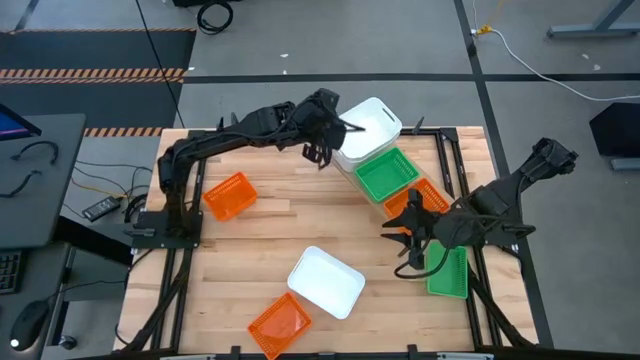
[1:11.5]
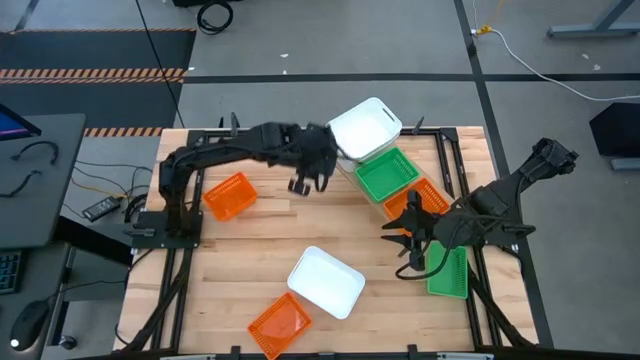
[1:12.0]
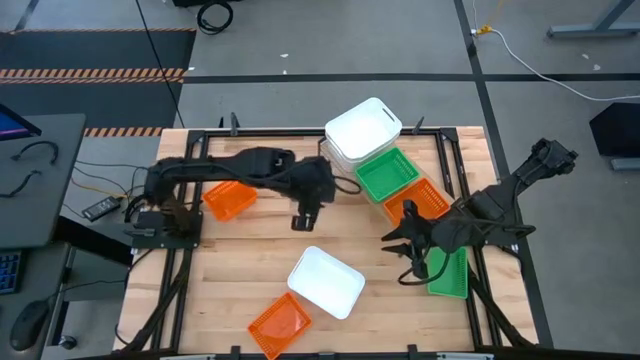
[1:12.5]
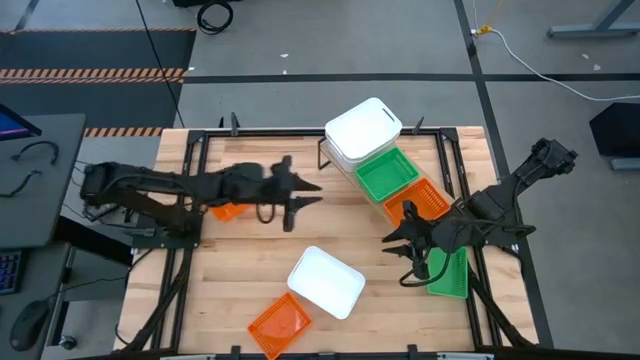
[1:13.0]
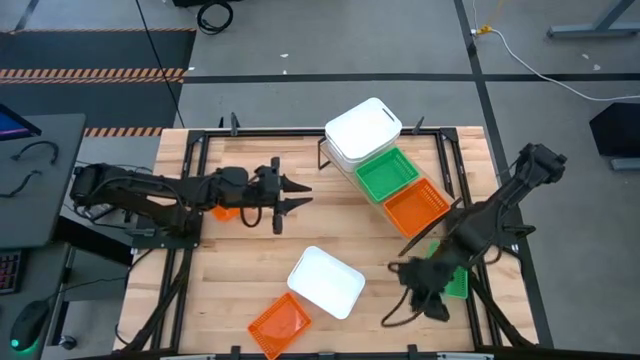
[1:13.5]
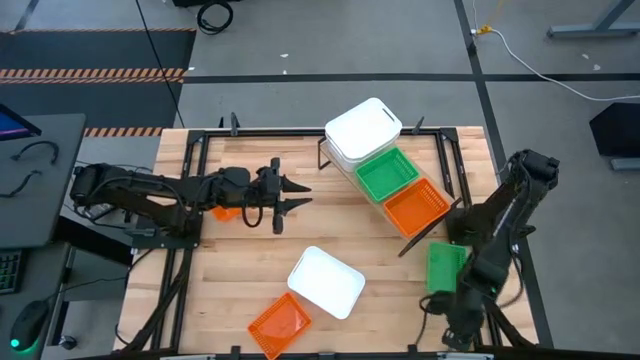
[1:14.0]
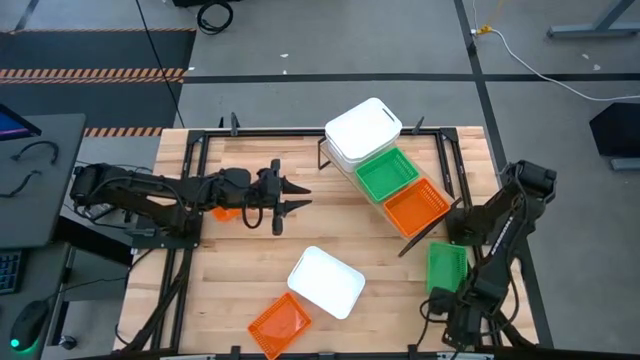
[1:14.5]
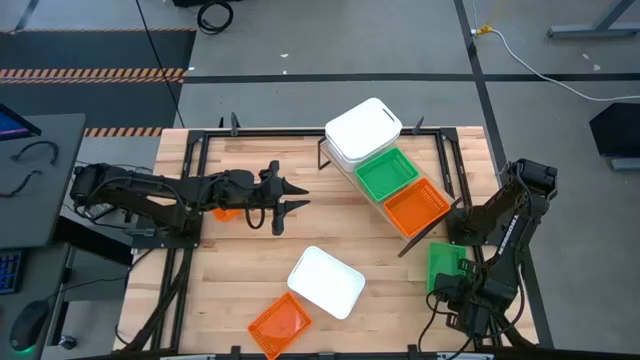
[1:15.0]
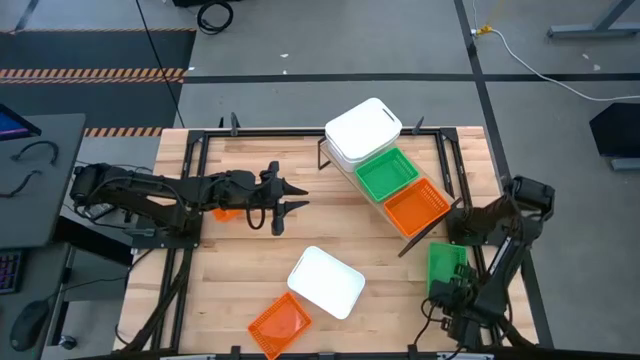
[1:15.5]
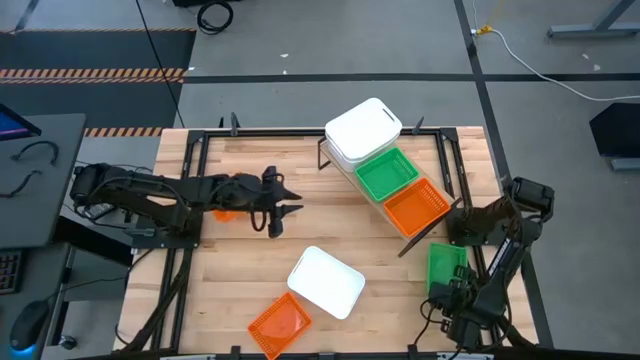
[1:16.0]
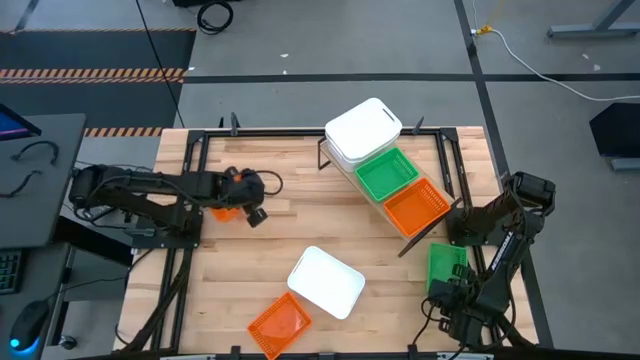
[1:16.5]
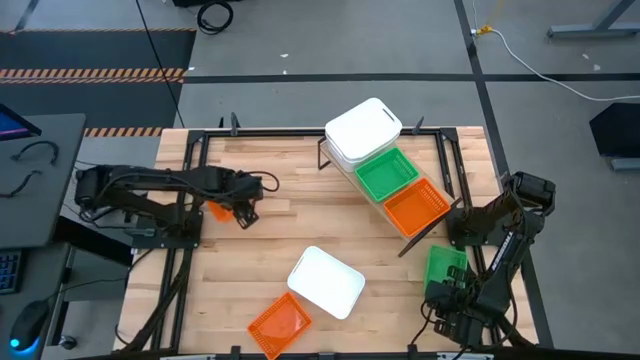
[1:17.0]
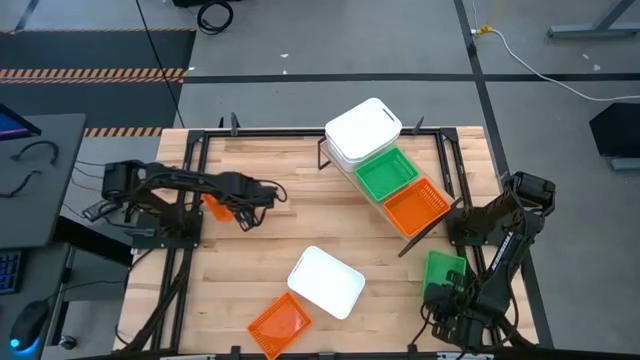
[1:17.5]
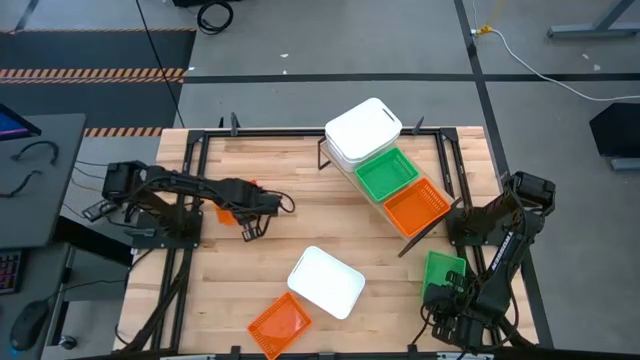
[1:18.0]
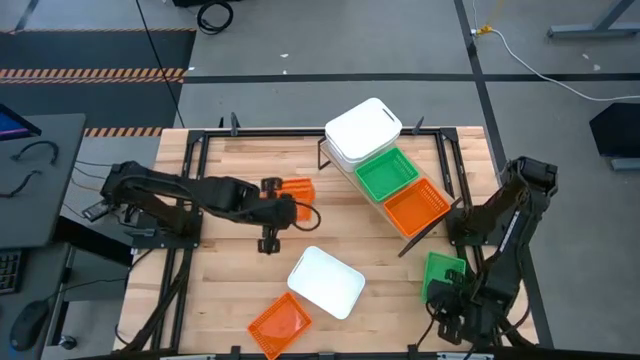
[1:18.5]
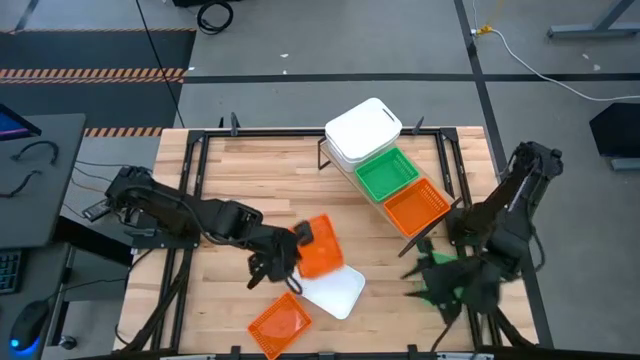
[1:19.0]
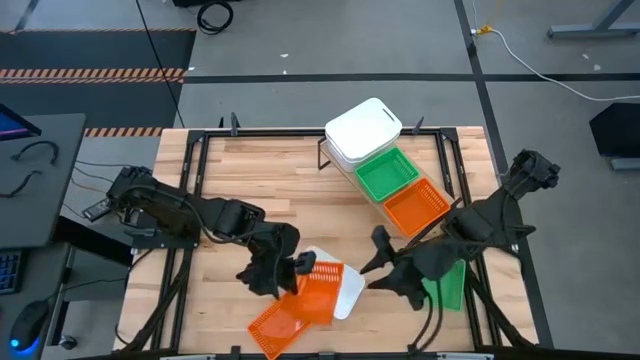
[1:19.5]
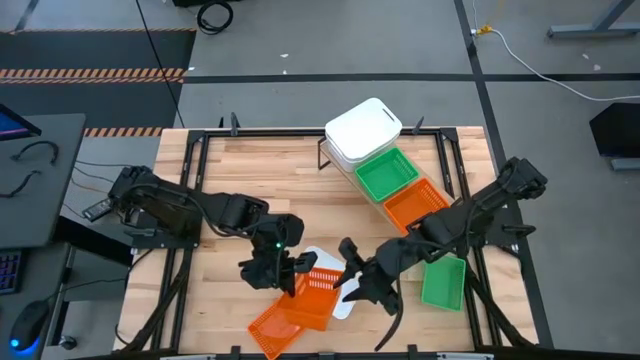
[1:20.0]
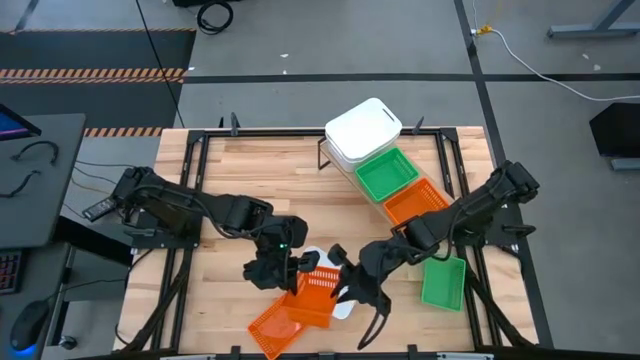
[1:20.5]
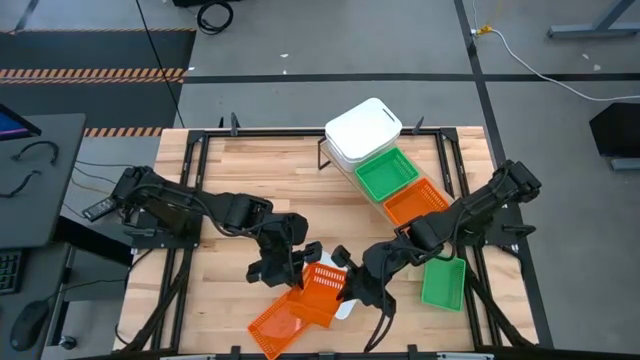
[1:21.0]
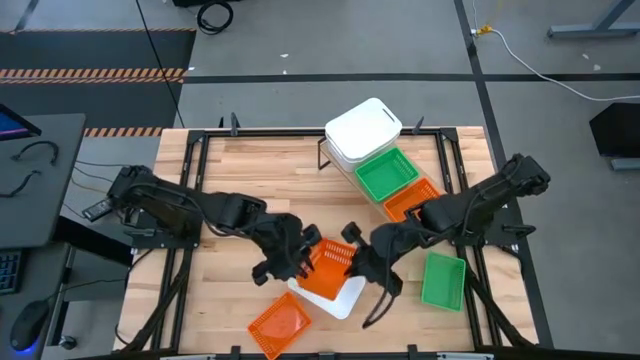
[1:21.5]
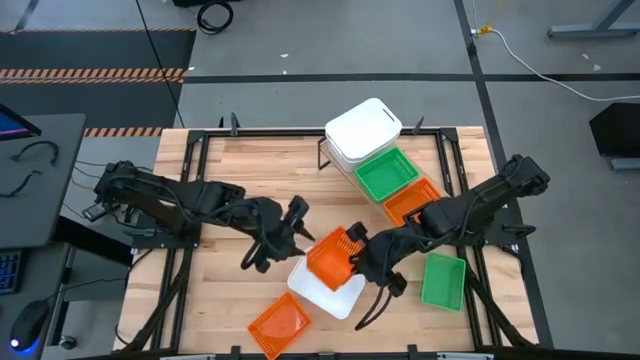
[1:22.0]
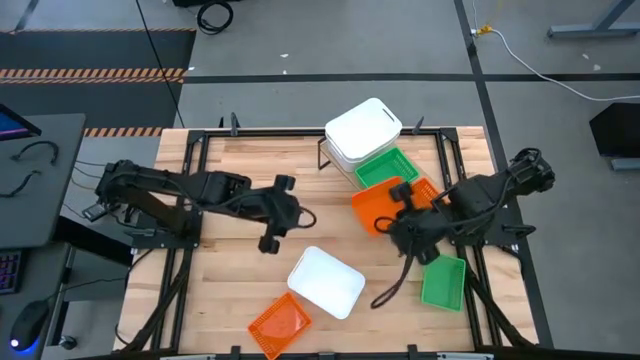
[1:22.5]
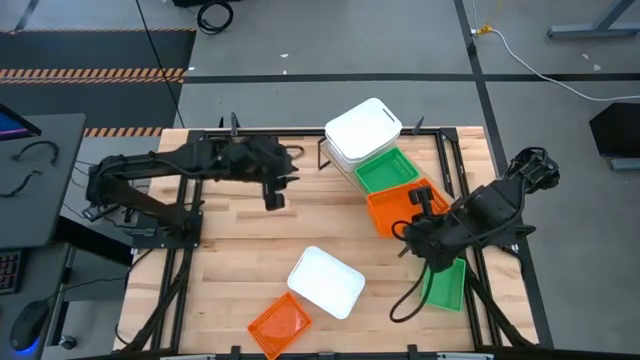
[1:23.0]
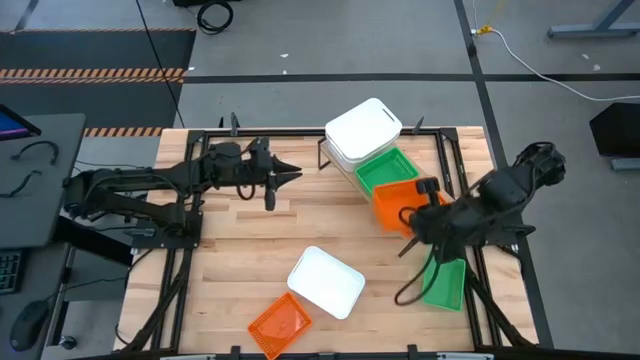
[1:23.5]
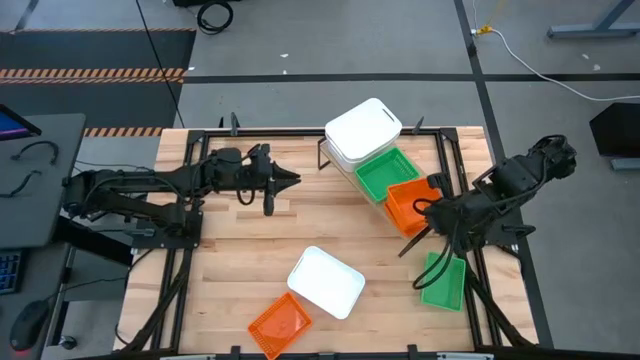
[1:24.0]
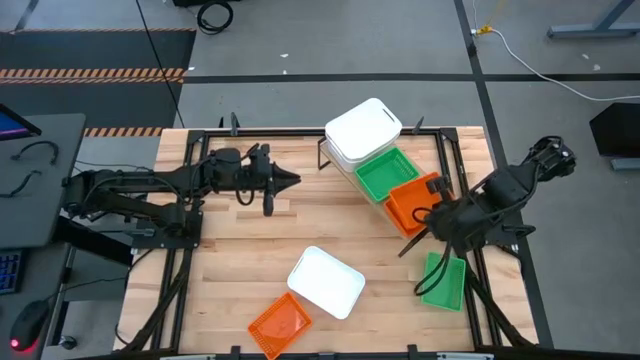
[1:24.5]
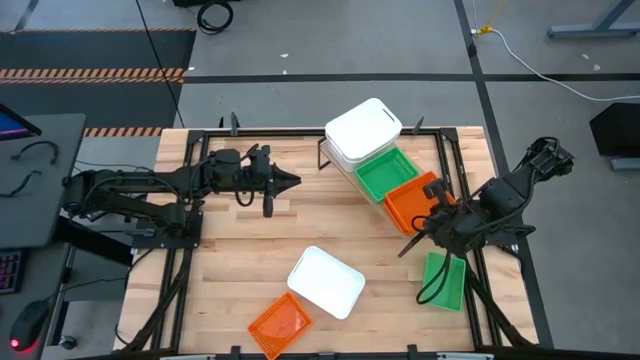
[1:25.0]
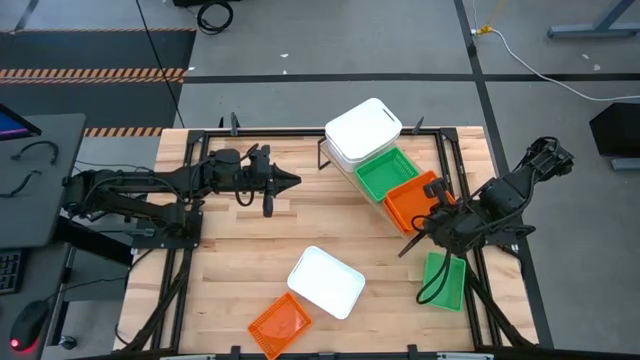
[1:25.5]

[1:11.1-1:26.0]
Task: Stack baskets on shelf by color
Stack the top orange bin on top of the orange bin on the shelf

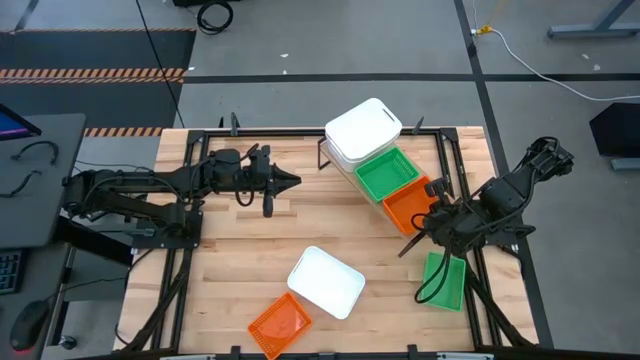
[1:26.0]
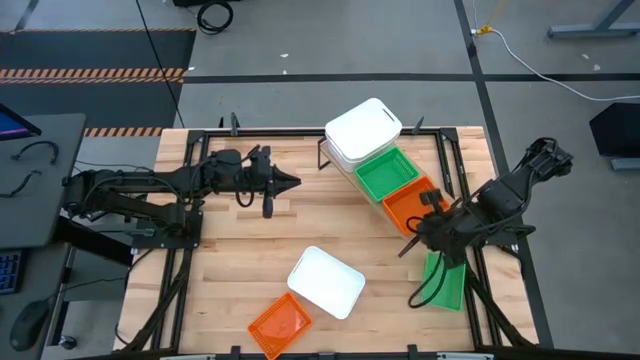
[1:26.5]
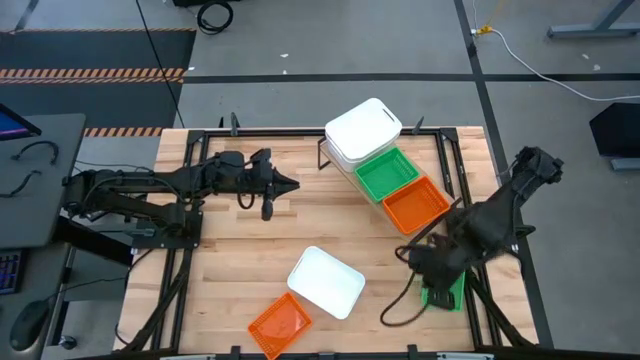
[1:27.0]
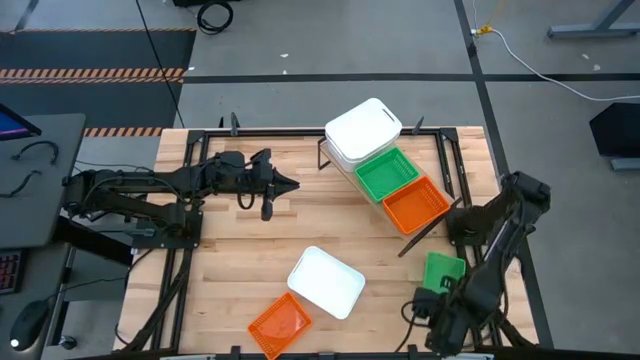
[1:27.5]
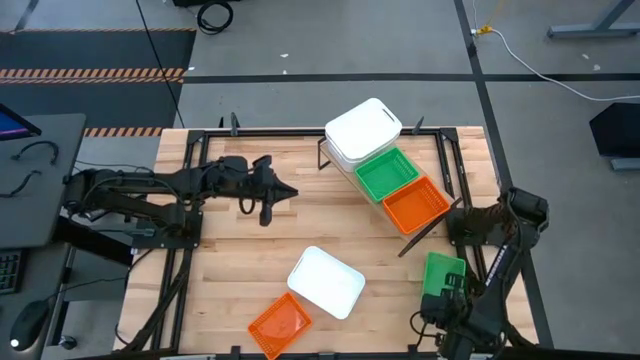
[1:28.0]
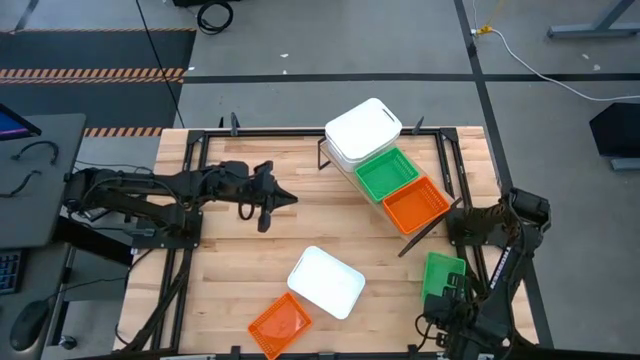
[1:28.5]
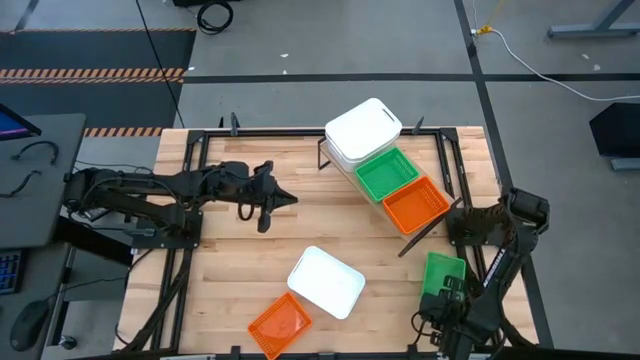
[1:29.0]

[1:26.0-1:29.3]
Stack the green bin on top of the green bin on the shelf

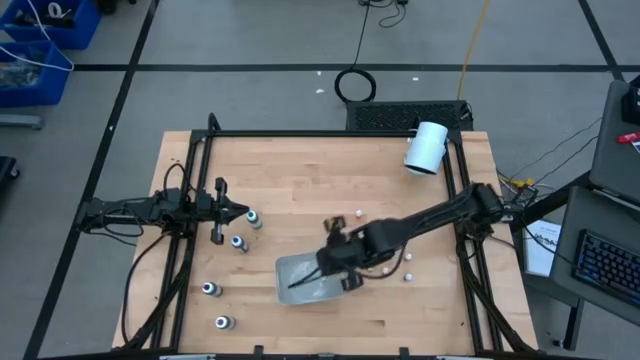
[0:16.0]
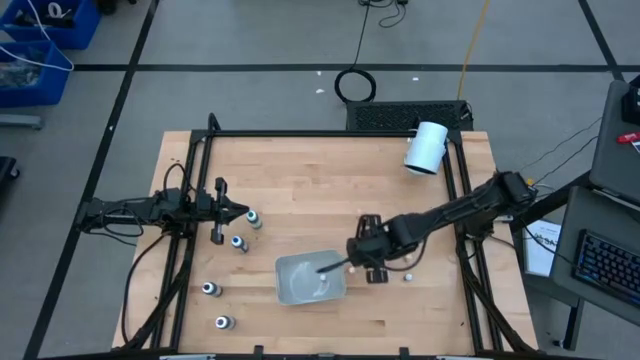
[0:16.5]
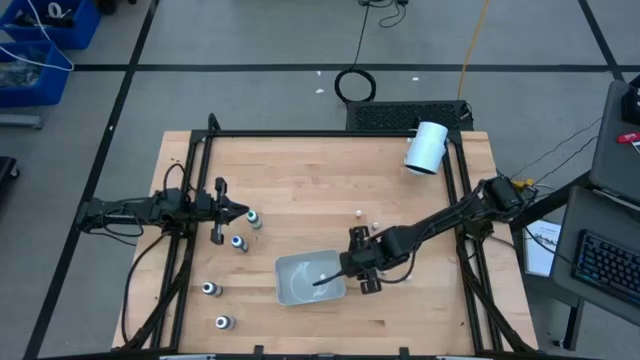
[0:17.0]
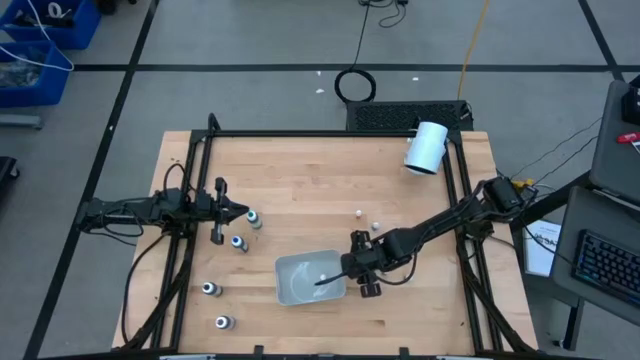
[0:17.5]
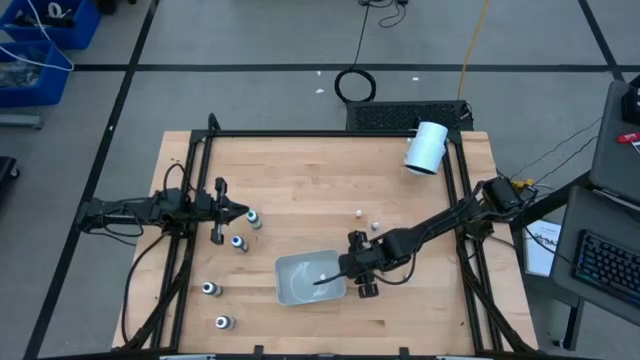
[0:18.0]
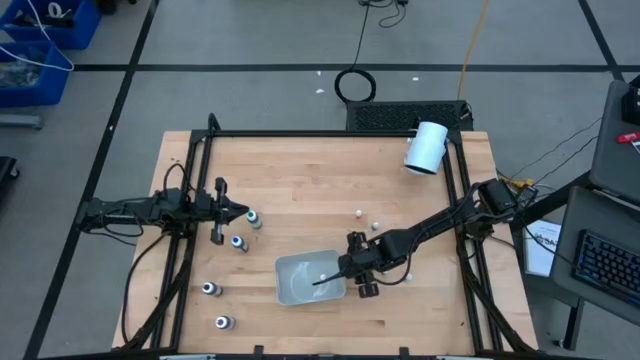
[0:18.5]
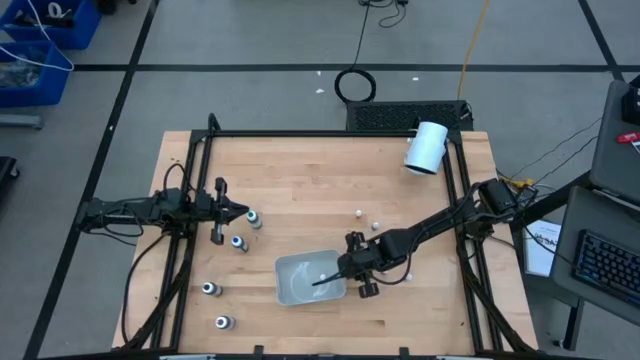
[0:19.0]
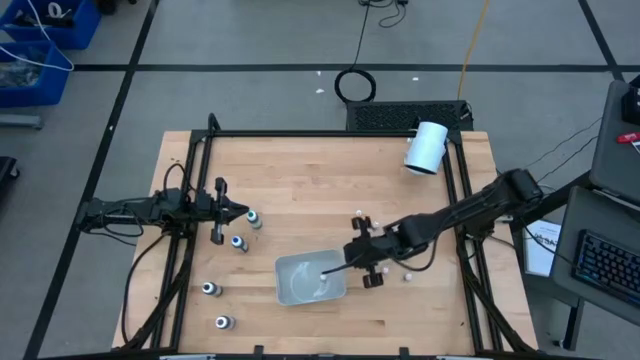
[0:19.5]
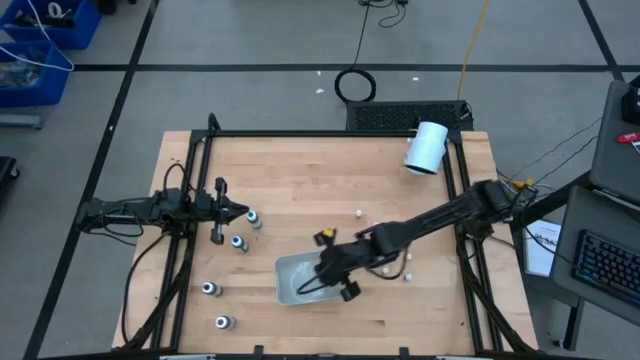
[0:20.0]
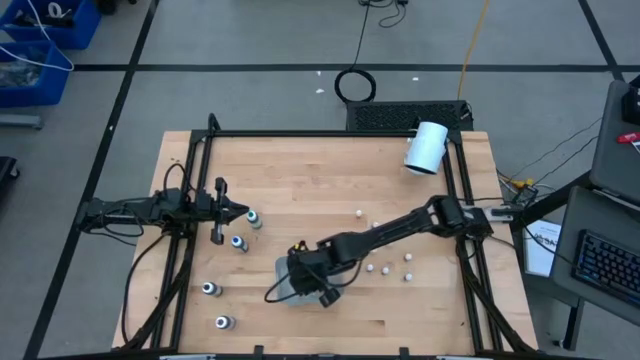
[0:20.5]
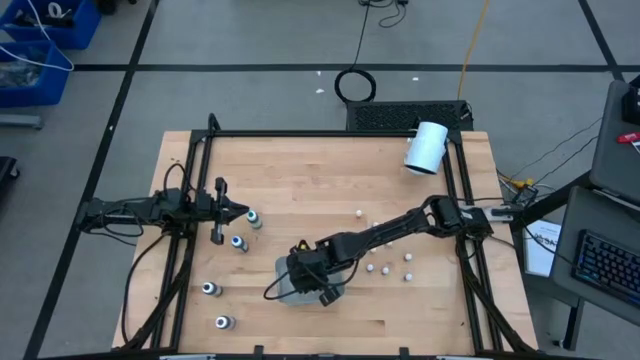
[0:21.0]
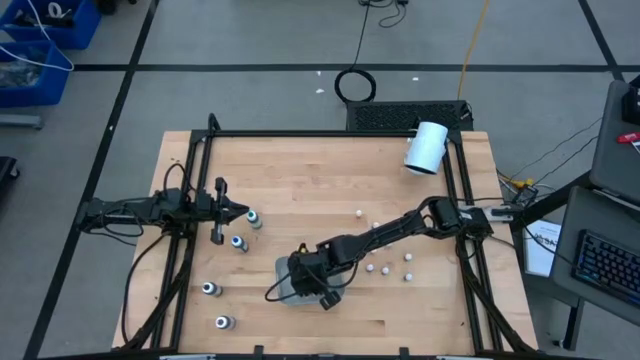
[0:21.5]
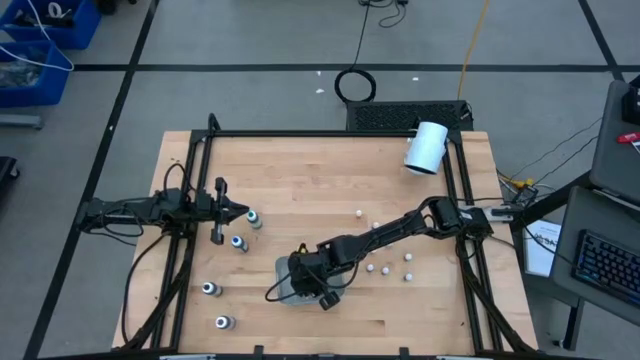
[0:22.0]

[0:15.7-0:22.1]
Task: Pick & Place food coloring
Put the small orange food coloring bottle in the gray bin
